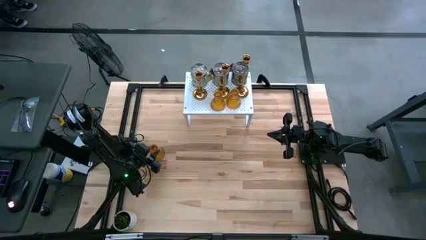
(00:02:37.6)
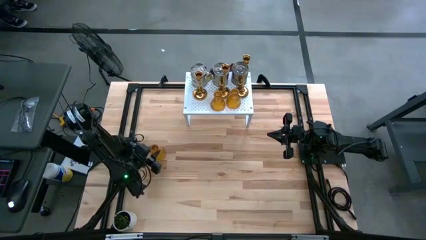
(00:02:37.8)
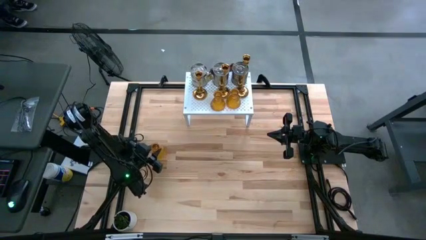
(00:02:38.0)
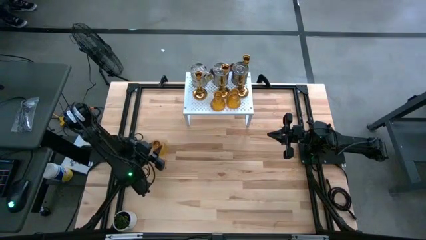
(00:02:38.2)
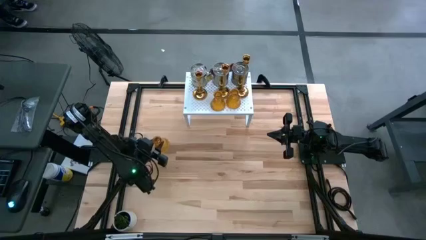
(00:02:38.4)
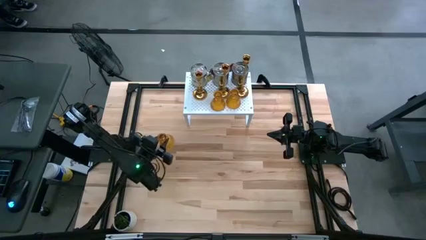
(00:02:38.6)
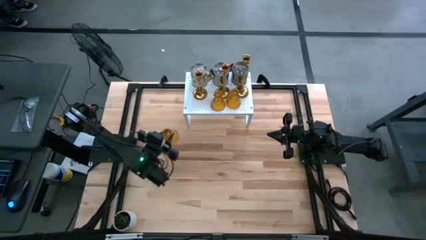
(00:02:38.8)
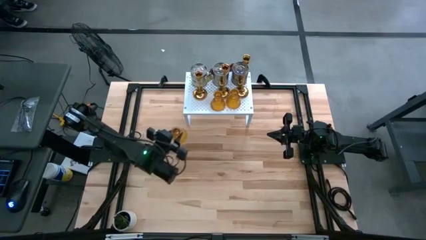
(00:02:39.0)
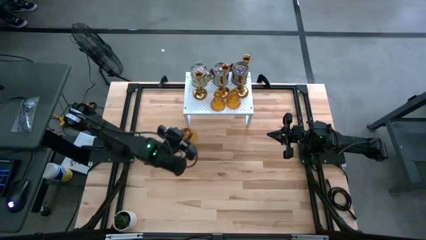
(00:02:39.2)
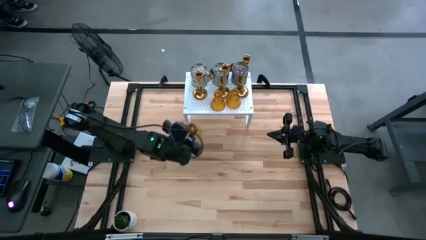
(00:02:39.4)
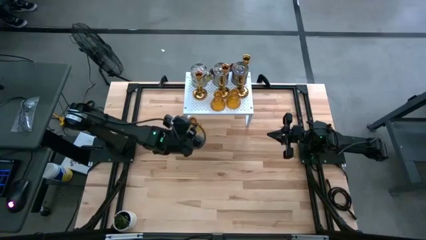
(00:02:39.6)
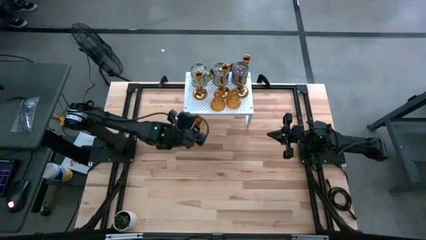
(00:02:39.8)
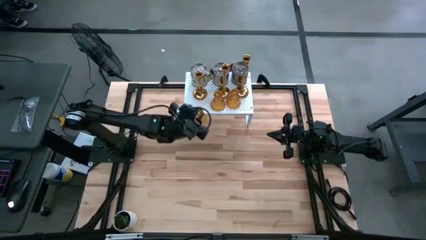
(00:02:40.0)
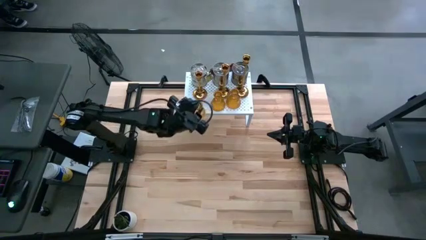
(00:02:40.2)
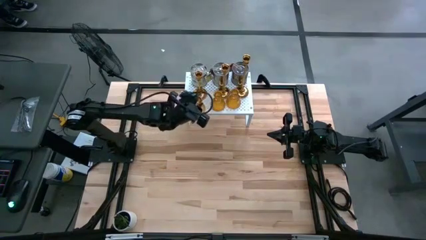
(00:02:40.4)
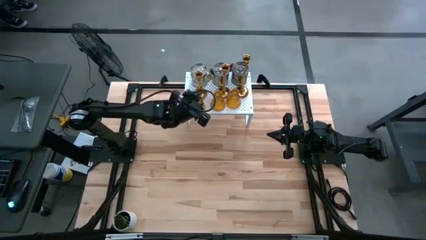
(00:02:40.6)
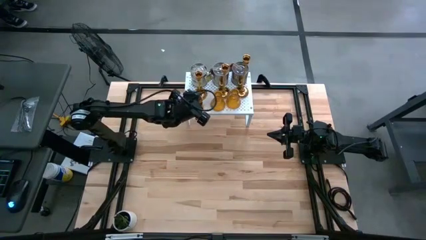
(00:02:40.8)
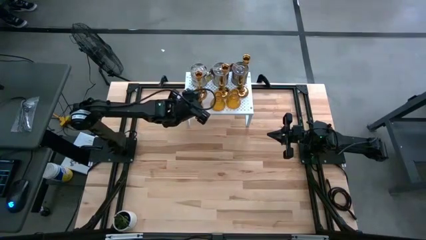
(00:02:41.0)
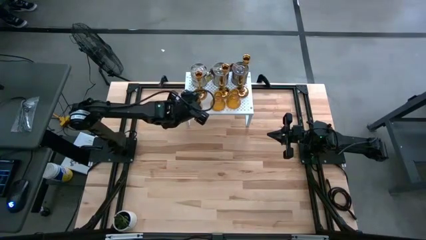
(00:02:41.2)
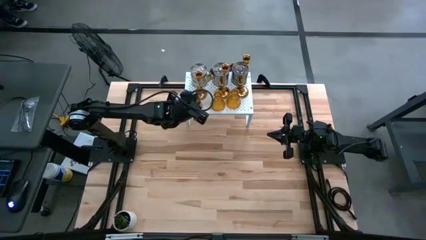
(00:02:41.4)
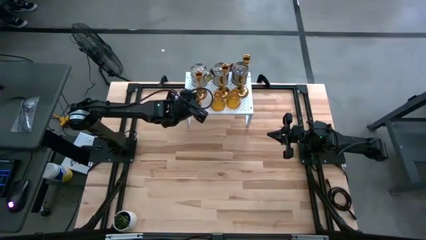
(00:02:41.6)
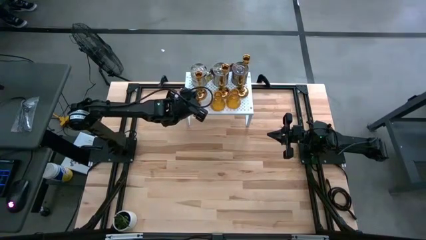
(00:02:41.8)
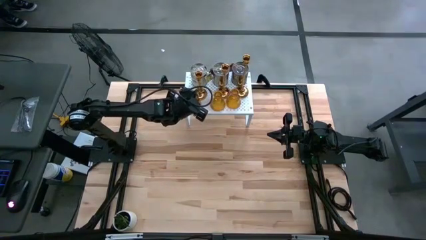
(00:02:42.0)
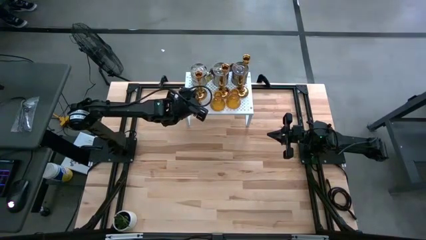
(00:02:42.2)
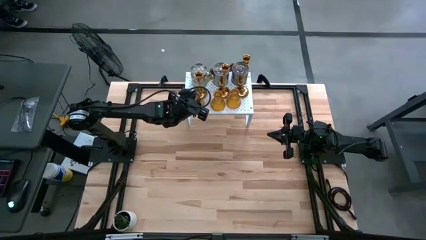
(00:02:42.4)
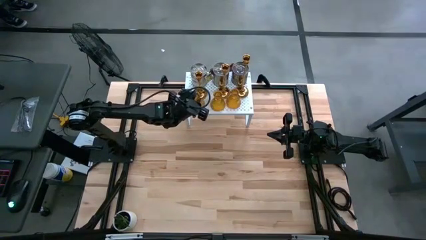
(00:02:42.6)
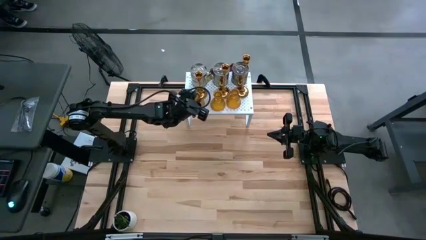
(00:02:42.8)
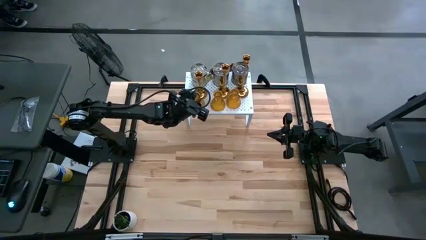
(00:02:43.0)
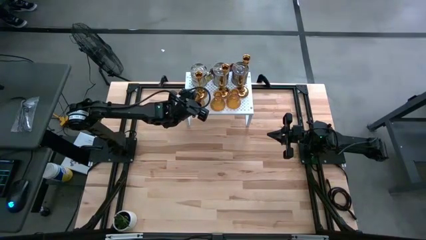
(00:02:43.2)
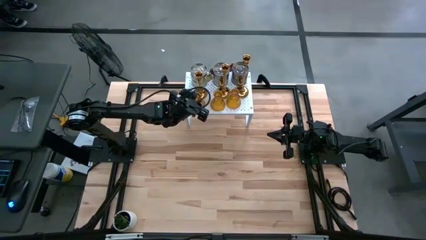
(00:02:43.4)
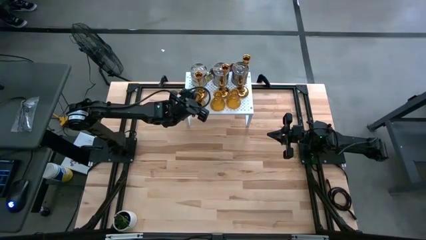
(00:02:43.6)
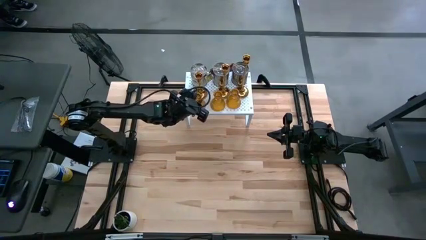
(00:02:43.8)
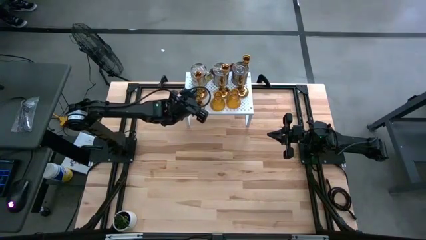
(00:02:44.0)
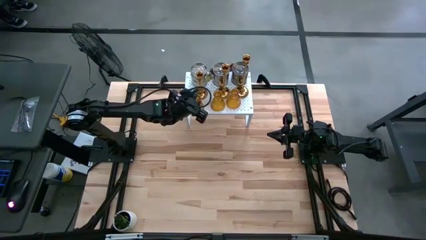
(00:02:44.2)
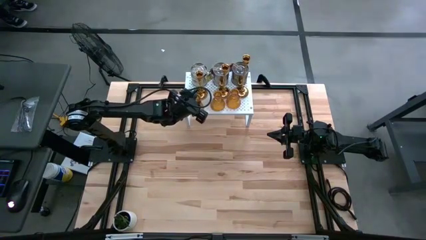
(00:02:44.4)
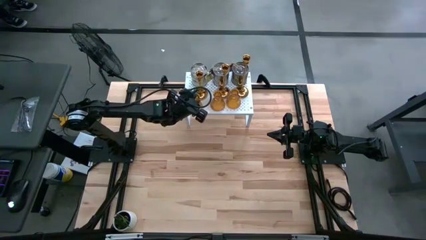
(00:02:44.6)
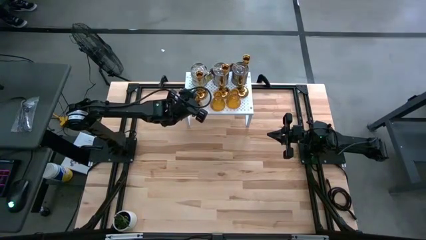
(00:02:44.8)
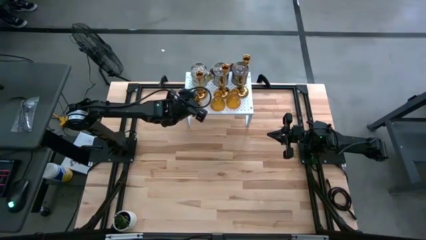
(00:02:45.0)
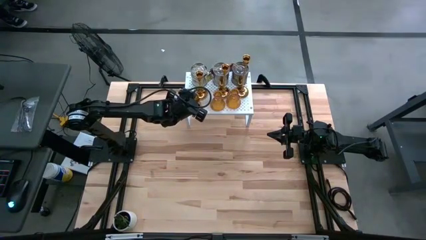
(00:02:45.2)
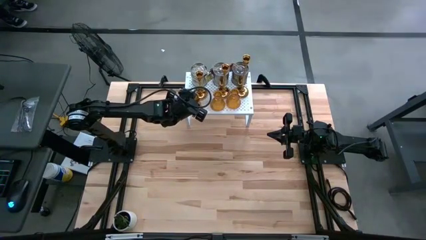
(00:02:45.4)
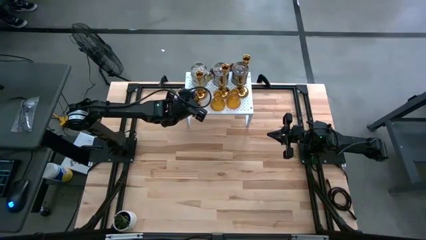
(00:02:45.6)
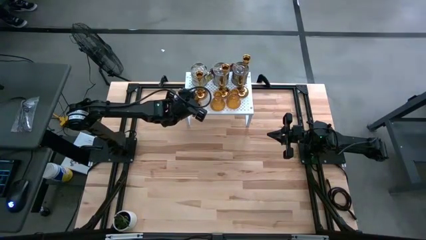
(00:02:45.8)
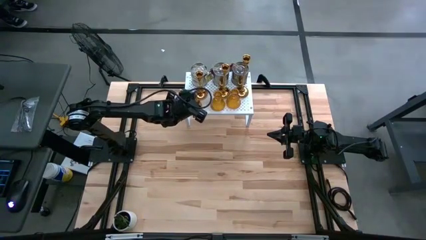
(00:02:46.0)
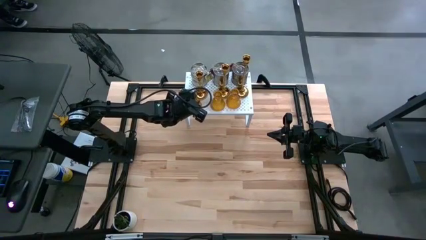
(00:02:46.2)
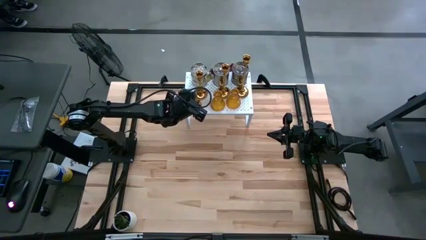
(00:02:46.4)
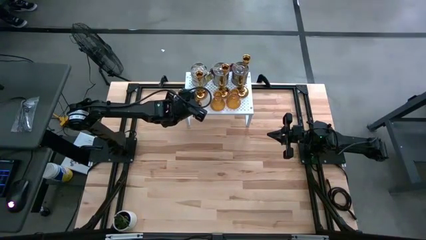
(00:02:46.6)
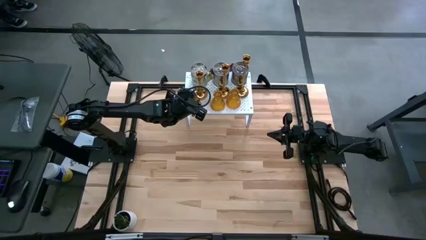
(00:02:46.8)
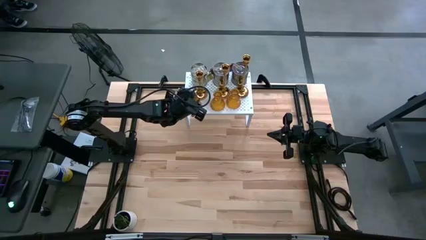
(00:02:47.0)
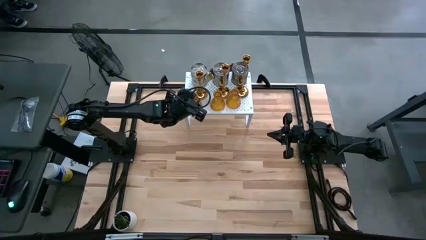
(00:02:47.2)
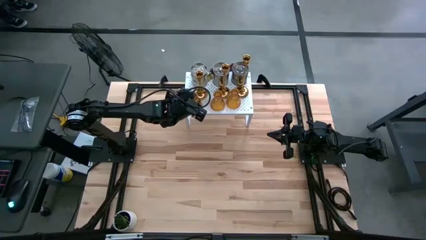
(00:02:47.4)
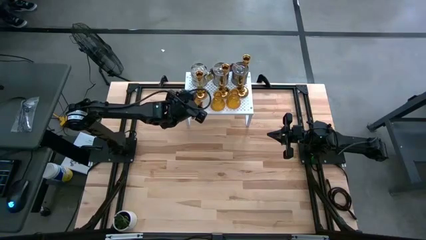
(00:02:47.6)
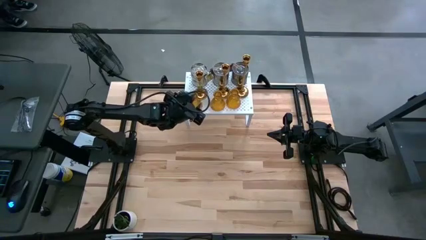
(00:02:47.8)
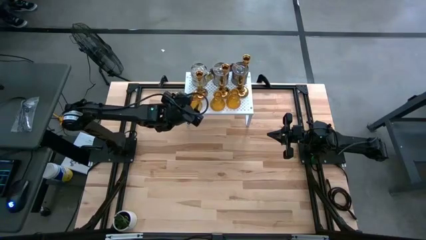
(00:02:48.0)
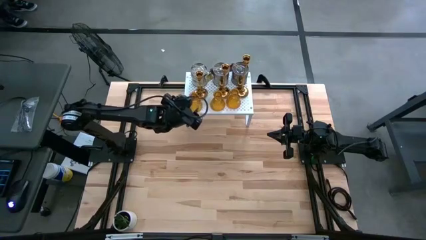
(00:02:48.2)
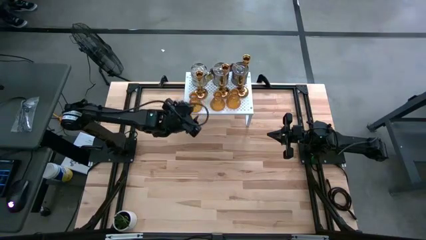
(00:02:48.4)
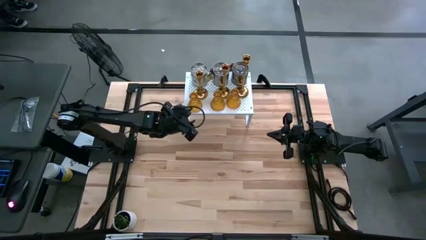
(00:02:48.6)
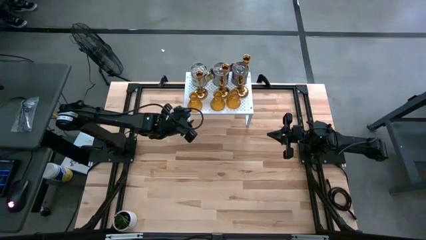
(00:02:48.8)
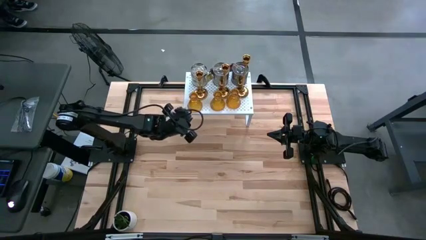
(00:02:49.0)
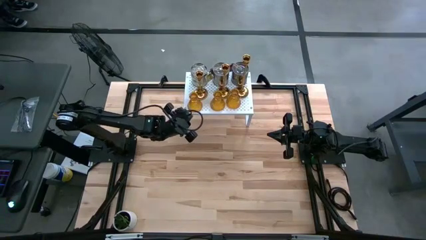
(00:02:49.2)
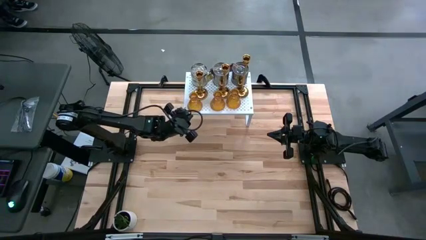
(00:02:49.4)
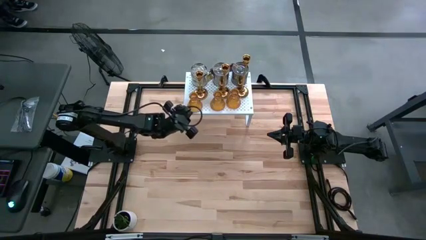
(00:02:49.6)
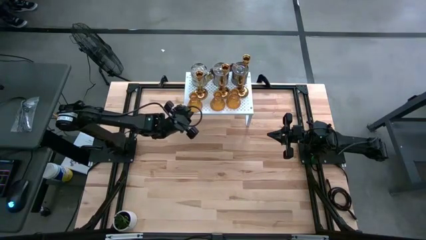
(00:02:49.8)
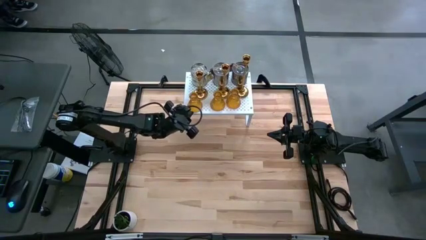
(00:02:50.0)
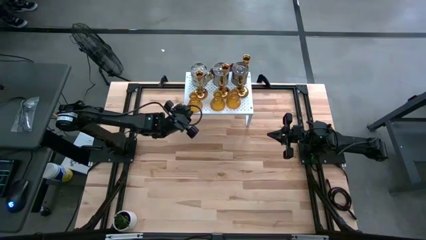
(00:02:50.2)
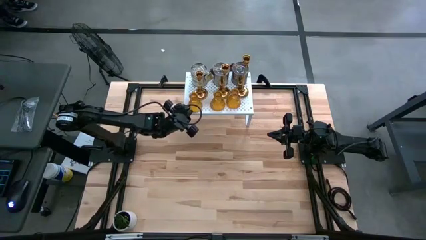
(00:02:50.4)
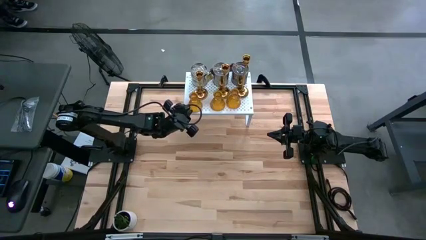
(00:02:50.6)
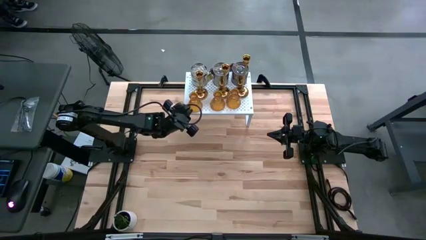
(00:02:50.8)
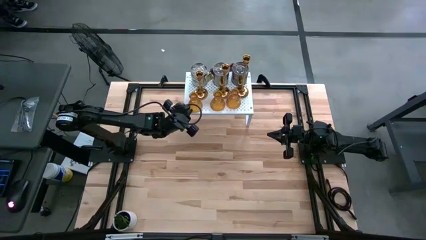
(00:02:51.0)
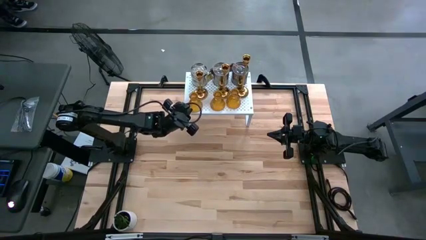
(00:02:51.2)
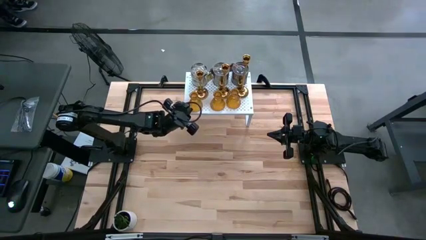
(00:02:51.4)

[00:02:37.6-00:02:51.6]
Task: Pick & Place candle stick holders
Put the yellow candle holder aligned with the other yellow candle holders on the shelf

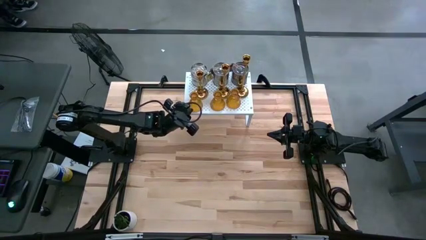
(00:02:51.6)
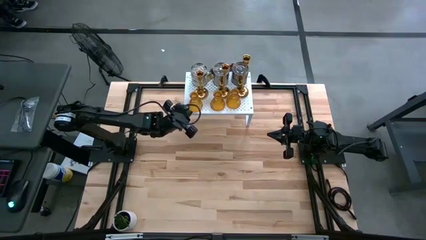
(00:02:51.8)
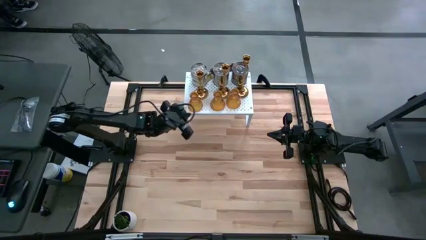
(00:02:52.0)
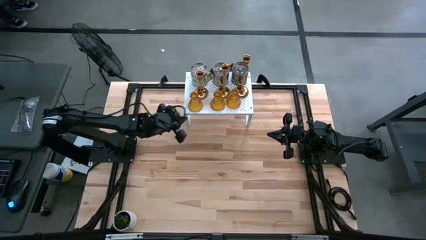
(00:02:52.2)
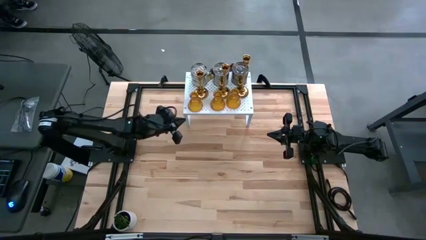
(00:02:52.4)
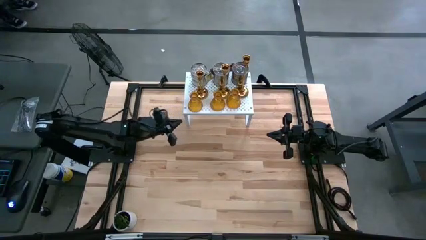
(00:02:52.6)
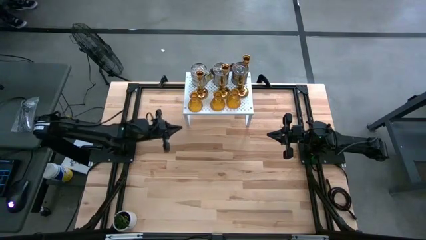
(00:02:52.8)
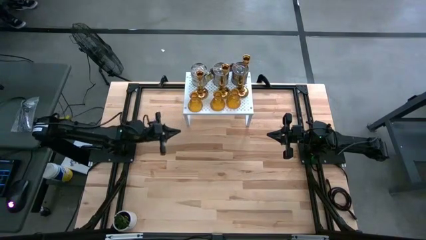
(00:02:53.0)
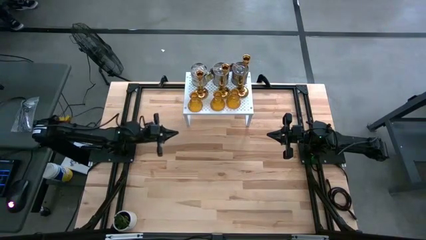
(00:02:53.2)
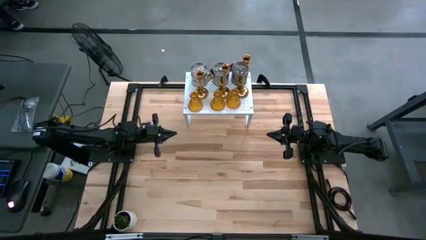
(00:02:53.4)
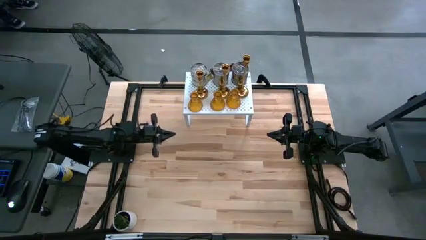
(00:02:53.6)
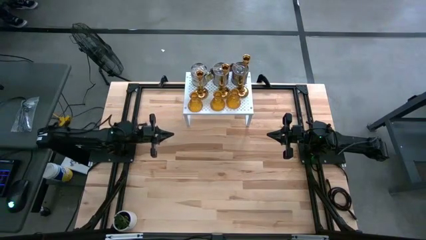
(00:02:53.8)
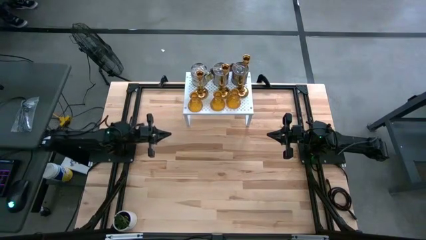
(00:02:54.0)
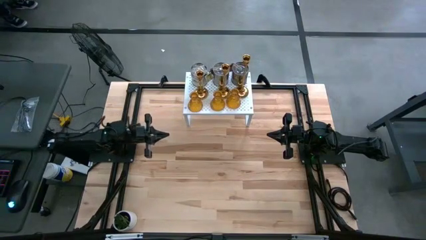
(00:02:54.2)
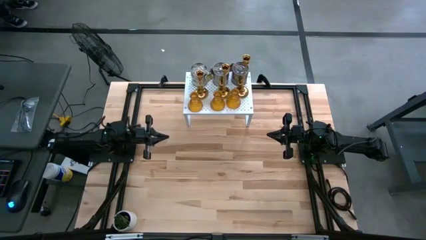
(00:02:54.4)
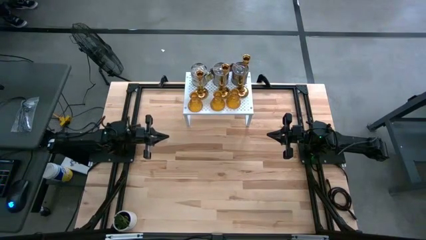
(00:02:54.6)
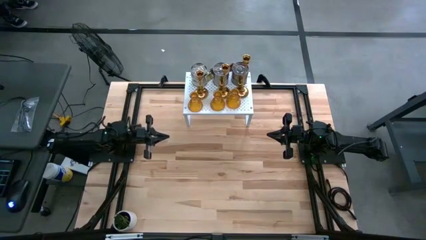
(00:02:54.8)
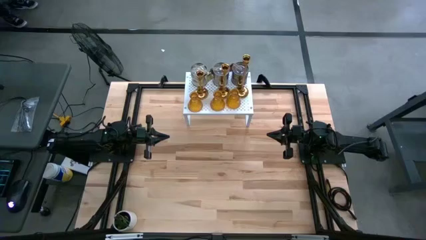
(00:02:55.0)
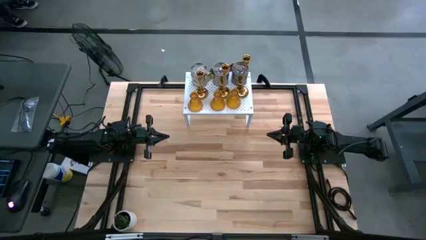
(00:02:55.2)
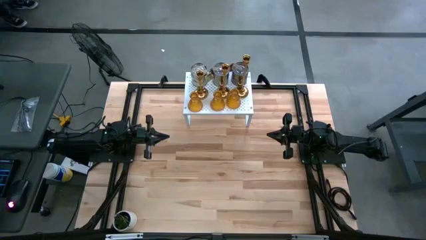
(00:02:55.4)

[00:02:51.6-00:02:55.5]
Return to Home Position
